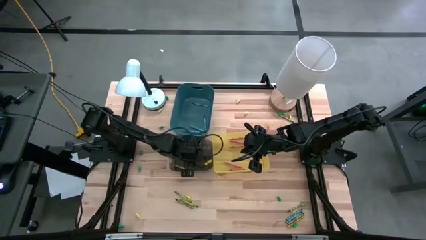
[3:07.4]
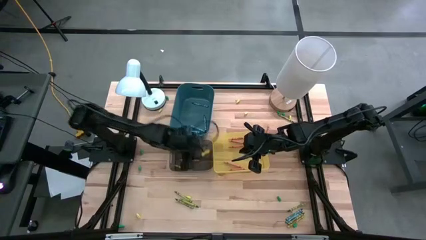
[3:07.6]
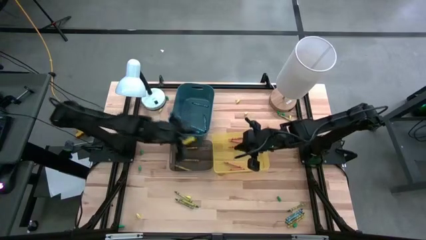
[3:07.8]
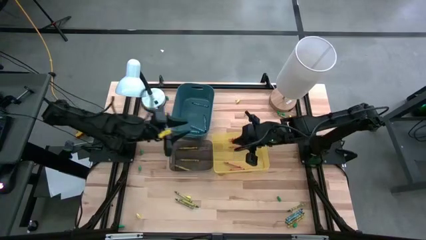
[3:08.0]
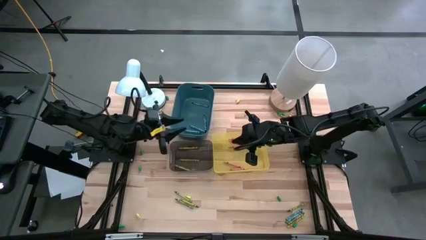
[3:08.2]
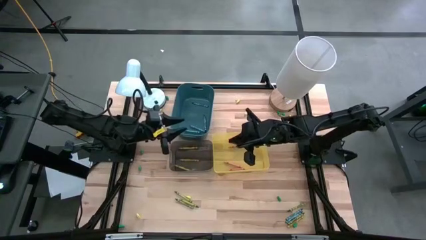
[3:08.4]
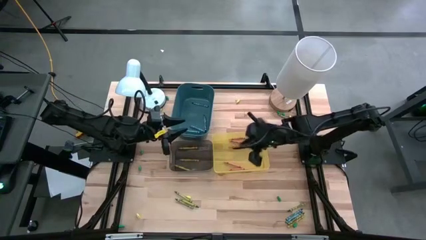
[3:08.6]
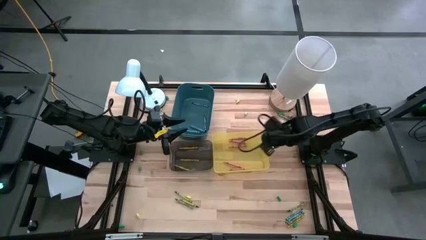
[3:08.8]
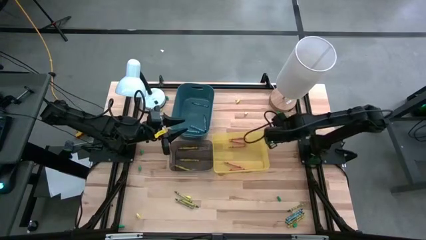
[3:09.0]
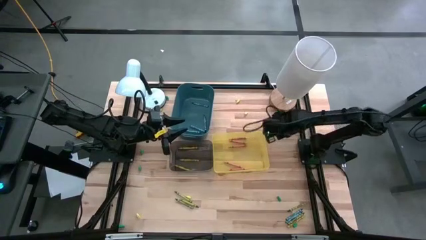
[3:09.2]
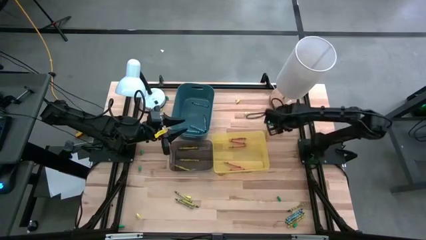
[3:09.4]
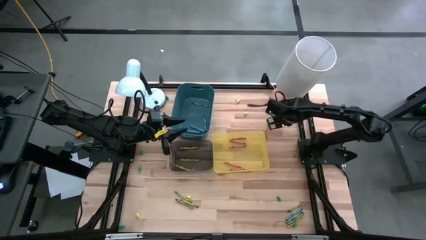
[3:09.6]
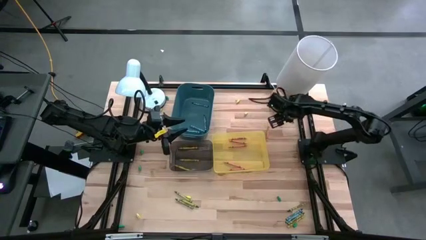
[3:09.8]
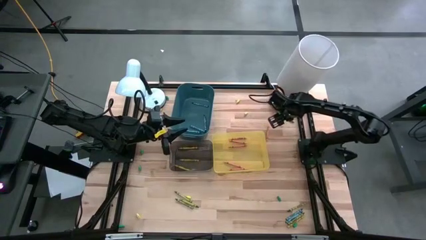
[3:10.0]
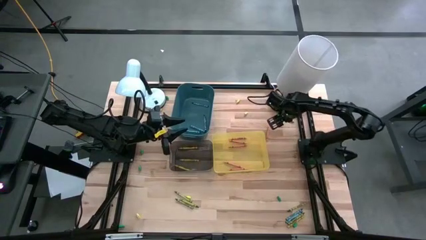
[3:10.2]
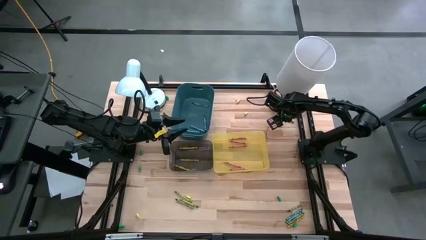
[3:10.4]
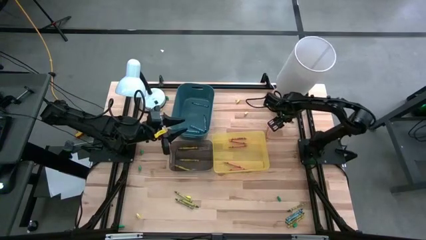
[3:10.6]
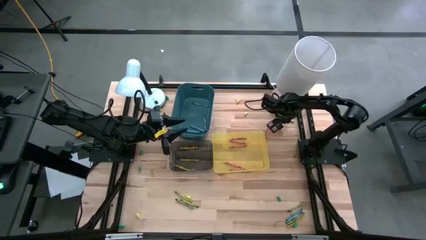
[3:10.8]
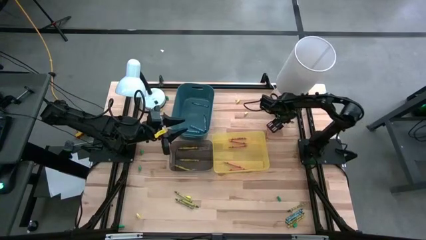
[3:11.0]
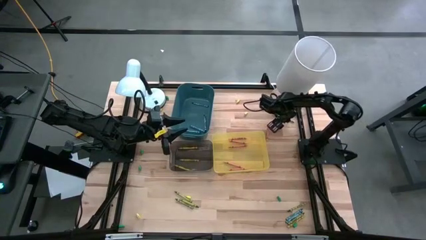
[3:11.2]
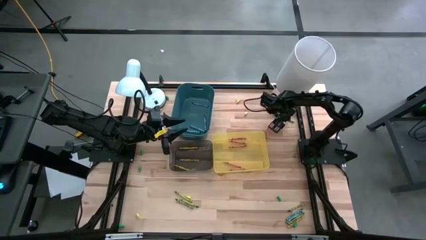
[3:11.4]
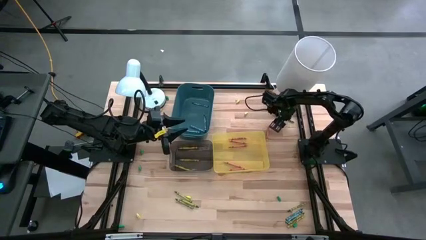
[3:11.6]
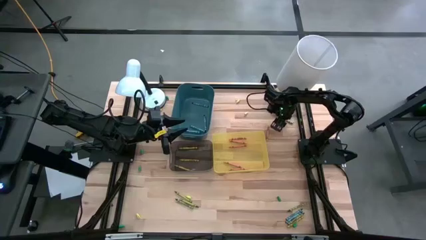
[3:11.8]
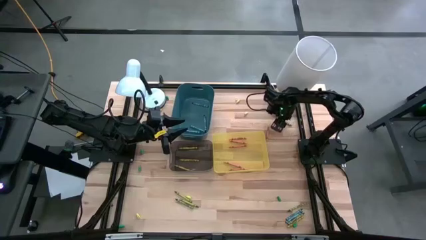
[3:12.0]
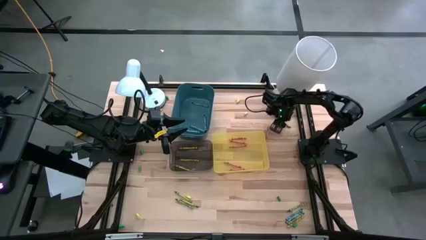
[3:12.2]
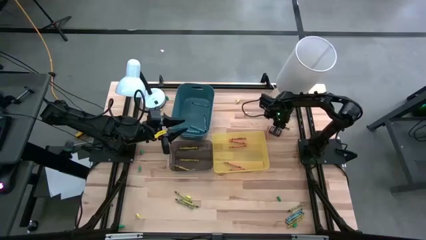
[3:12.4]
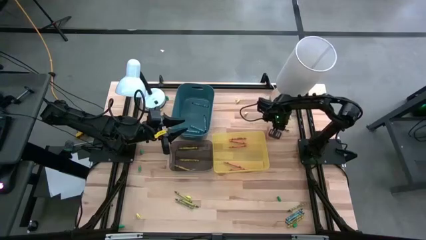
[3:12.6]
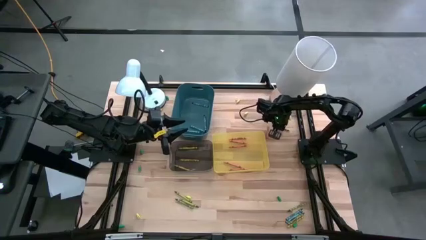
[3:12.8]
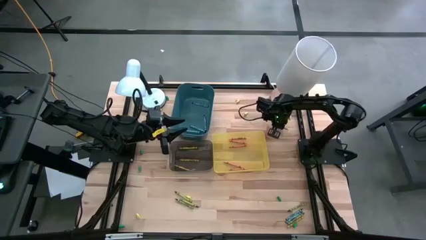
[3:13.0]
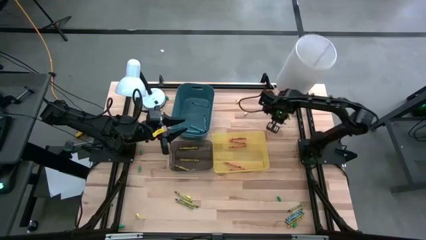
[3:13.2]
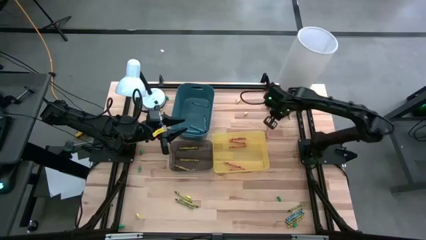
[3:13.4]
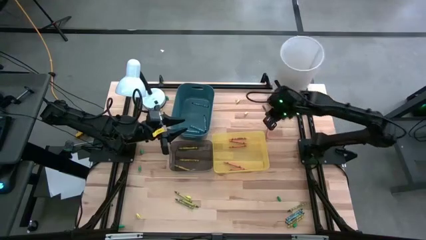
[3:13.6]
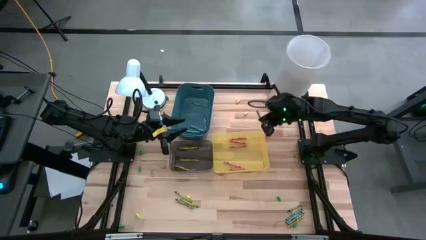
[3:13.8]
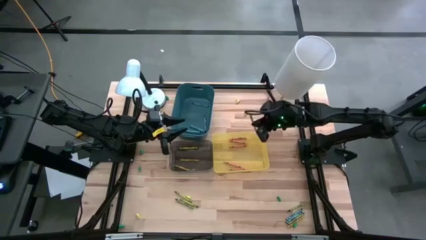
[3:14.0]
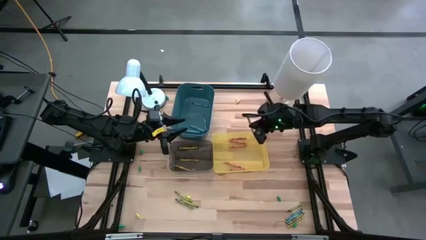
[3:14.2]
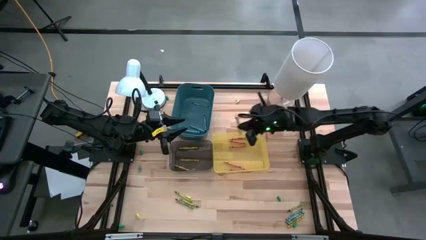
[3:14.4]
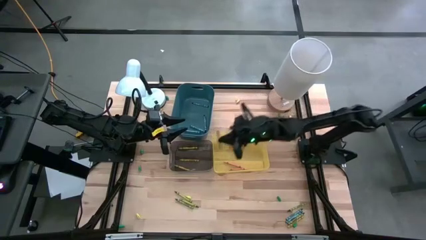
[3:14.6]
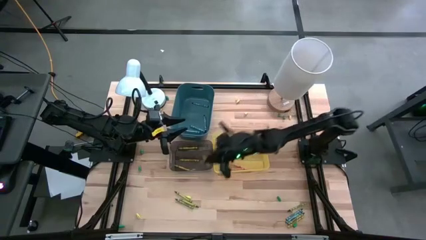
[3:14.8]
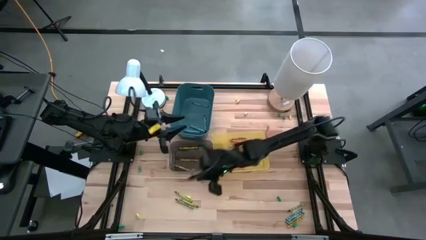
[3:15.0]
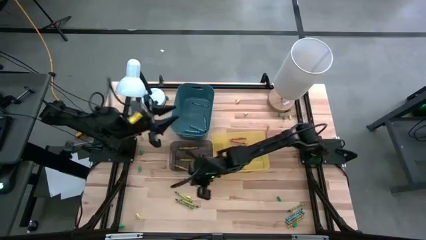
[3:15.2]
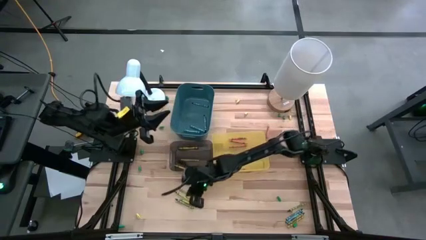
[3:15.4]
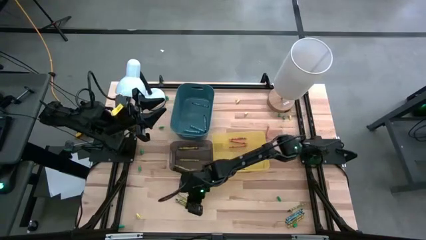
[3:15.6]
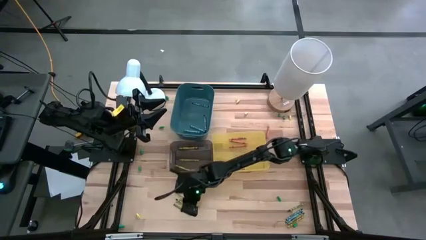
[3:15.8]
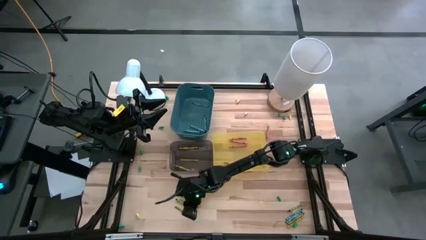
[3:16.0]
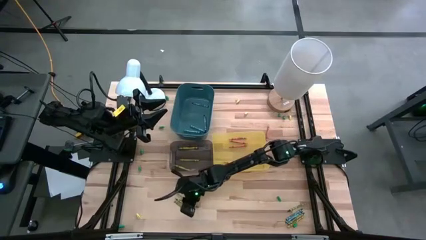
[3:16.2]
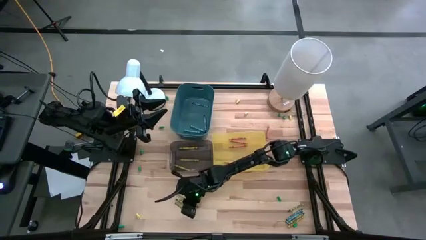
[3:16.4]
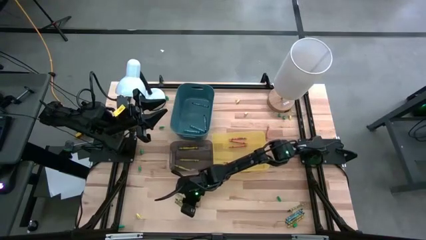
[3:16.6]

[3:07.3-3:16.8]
Task: Sort crayons
Move the green crayon to the bottom left of the table

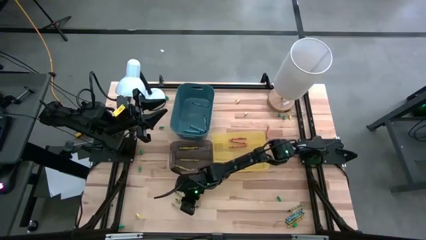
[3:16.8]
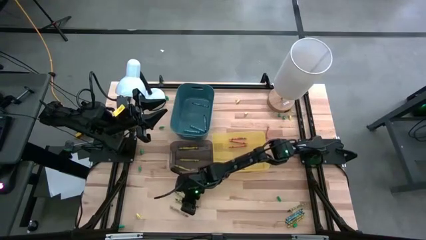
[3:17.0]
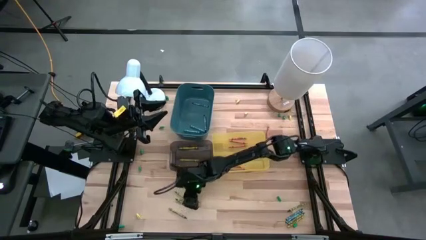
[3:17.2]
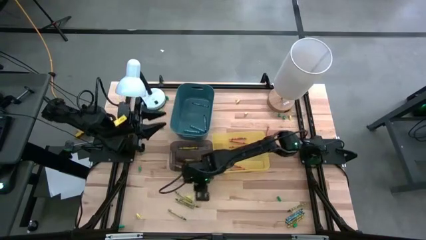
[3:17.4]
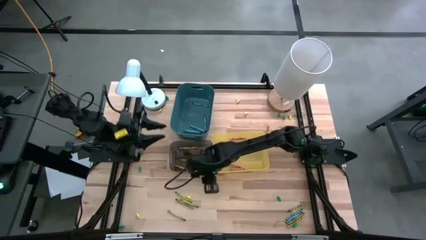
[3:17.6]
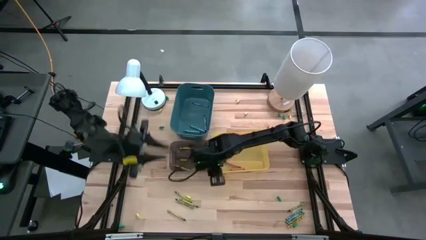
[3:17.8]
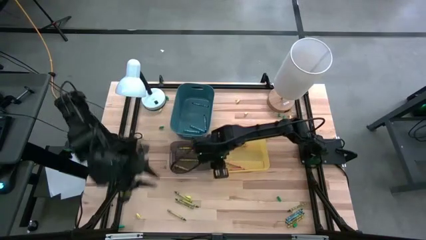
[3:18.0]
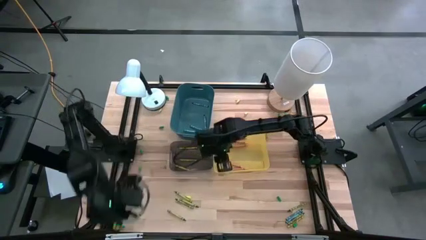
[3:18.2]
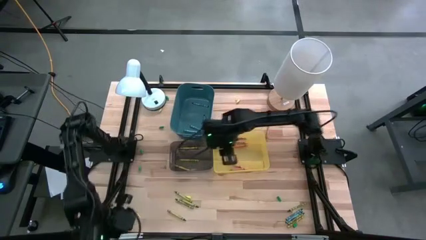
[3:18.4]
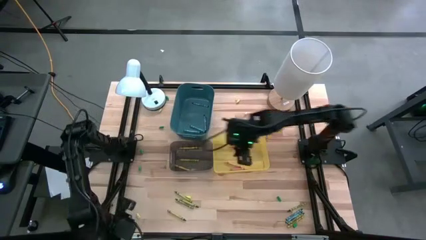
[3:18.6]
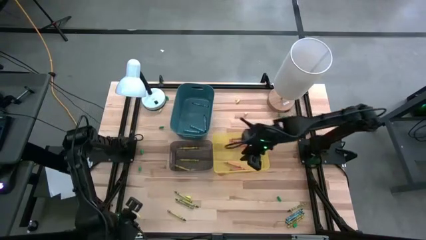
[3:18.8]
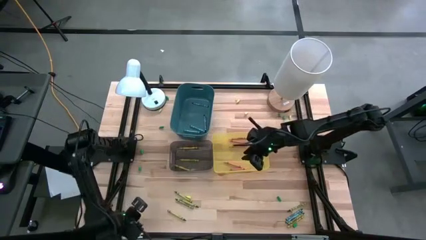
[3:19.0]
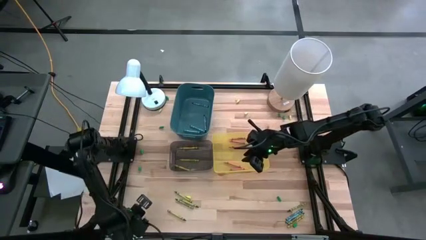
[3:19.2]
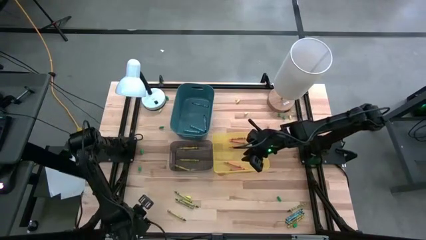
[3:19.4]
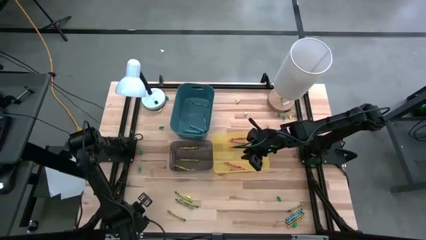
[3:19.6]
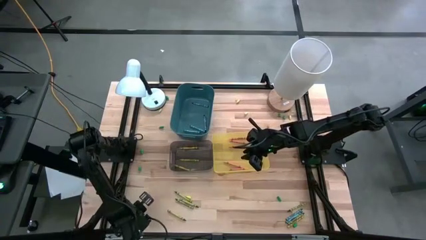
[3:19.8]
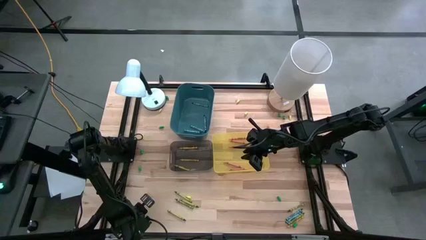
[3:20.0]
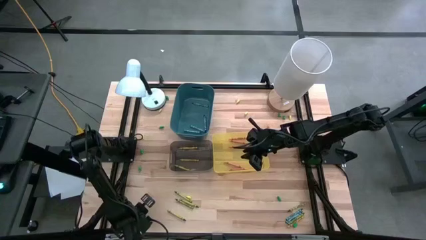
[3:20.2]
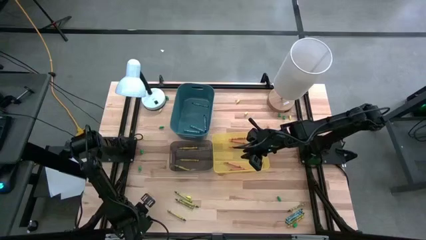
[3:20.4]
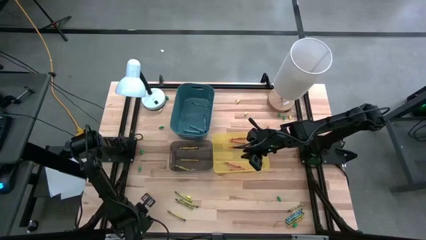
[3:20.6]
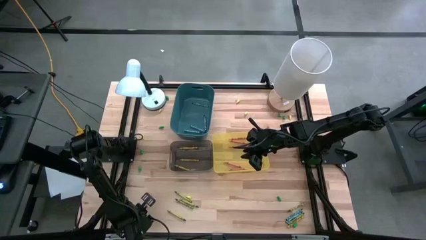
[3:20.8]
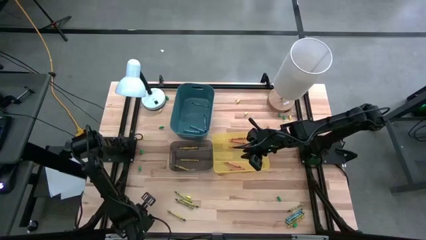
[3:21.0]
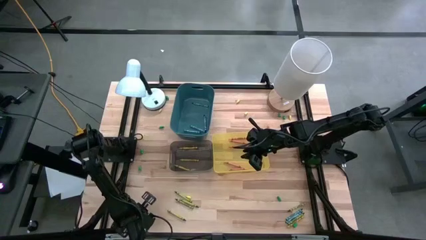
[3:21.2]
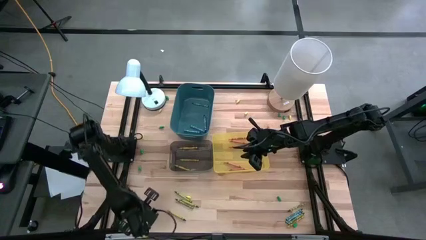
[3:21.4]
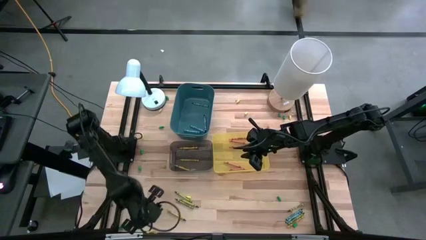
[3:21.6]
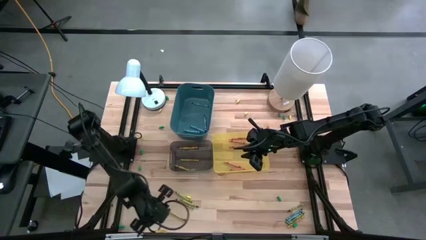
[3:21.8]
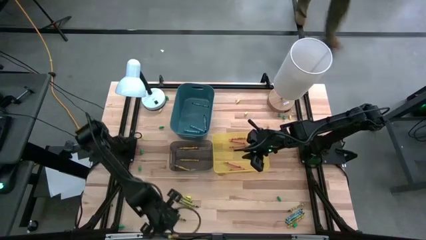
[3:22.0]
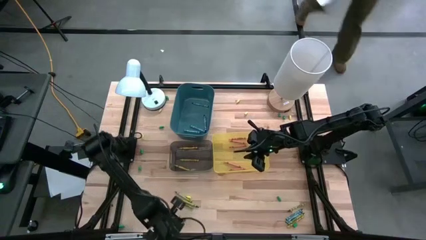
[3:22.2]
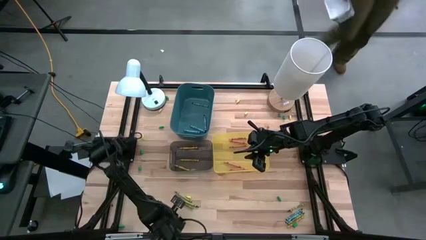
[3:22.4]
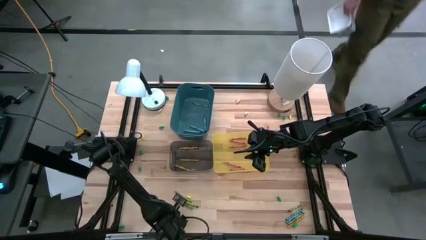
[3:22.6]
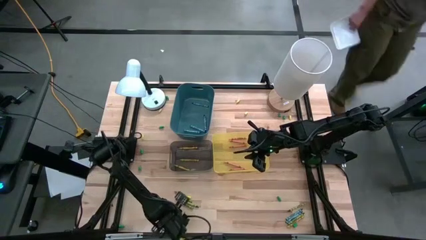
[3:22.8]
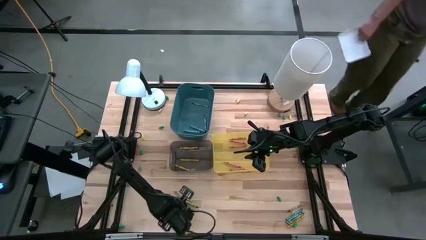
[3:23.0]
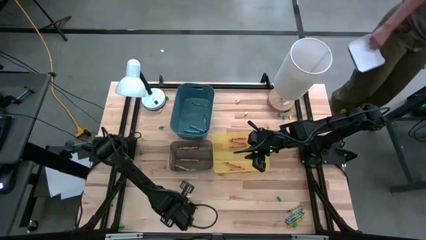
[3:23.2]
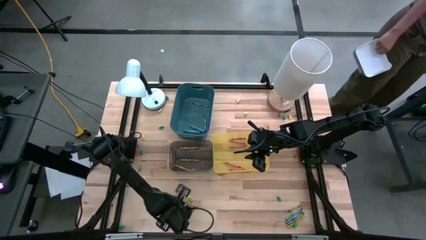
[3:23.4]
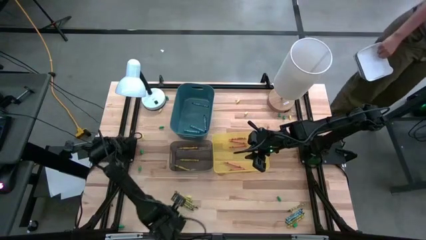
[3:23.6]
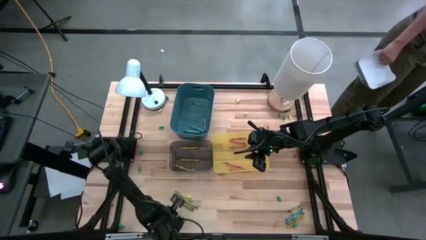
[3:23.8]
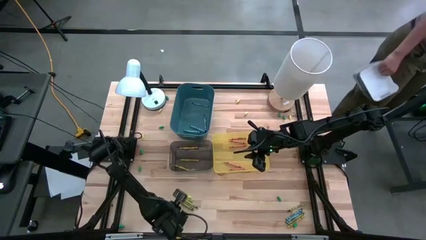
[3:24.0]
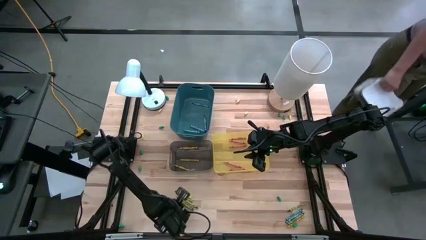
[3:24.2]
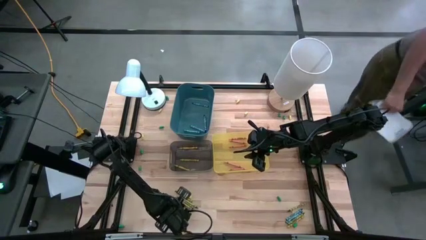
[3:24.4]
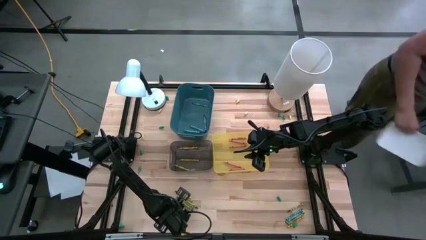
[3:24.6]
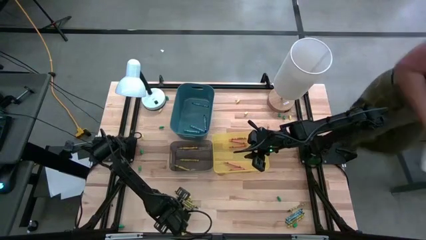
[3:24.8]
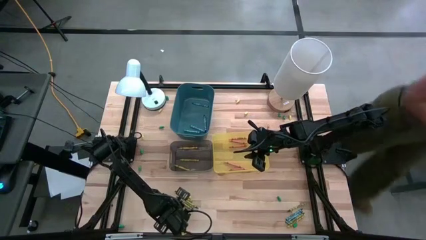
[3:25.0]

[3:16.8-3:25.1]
Move the yellow crayon cup to the bottom left of the table
